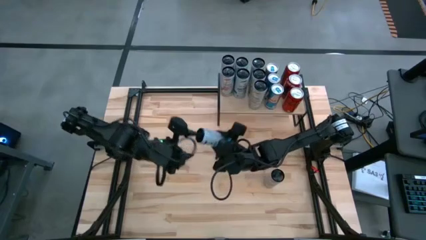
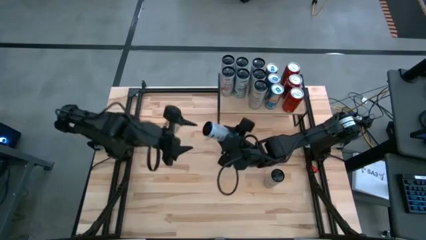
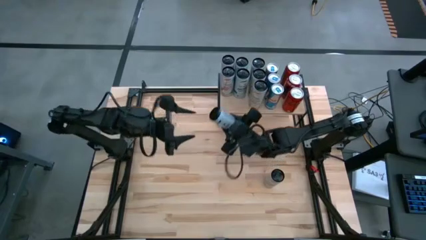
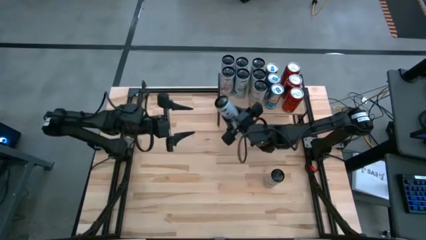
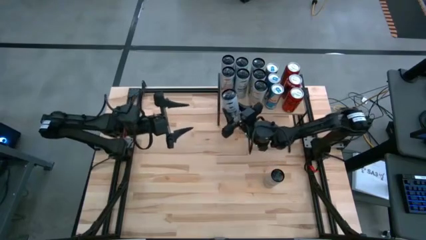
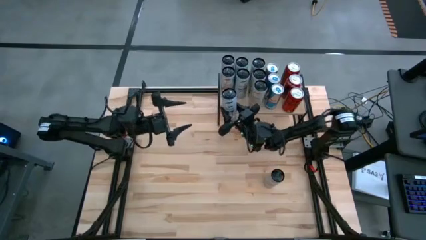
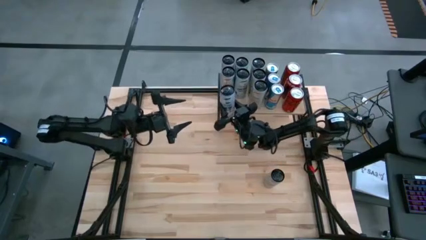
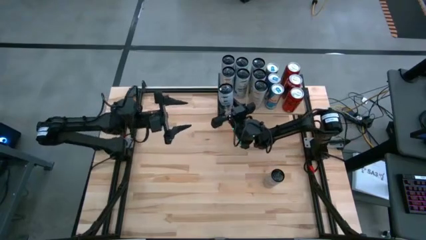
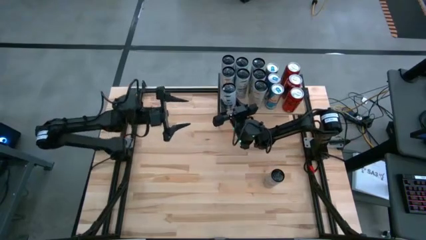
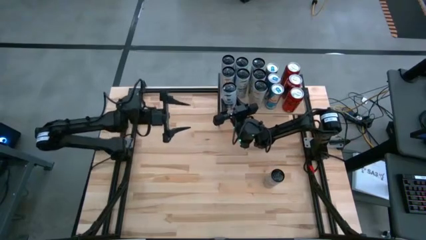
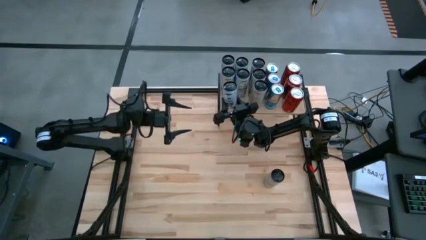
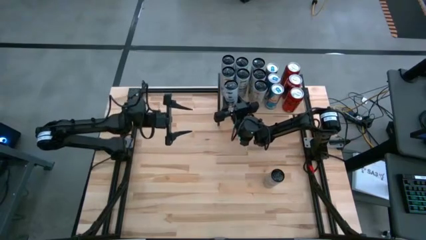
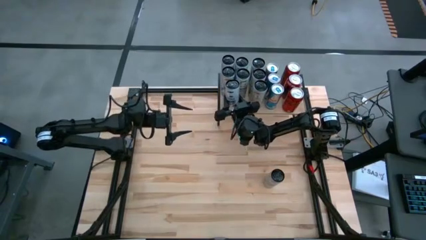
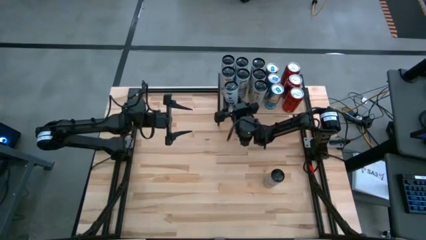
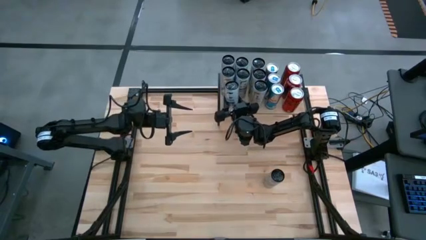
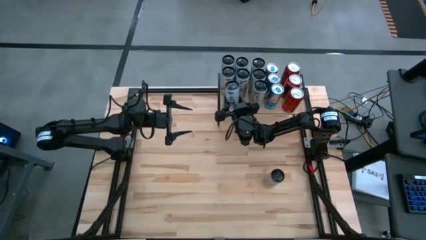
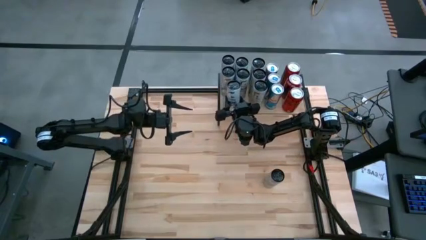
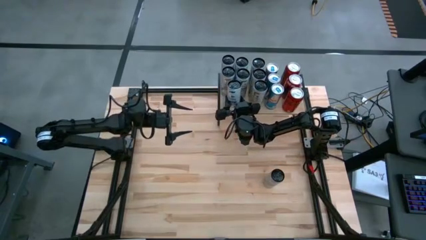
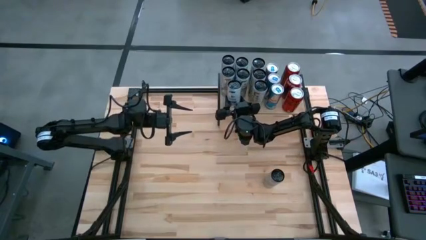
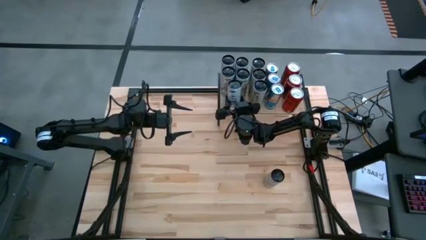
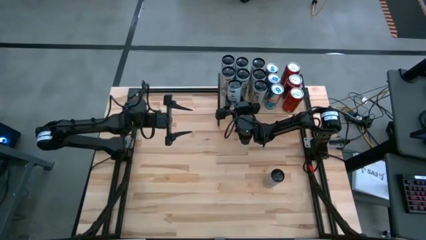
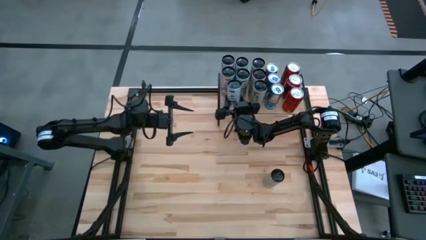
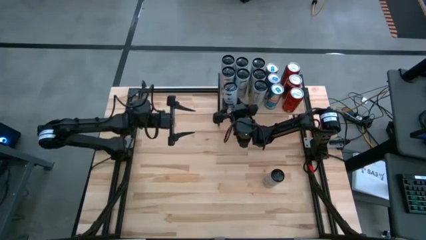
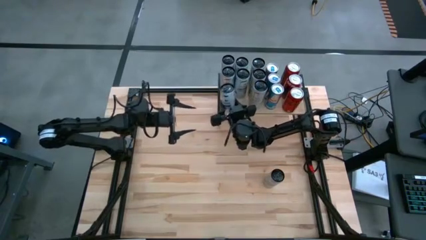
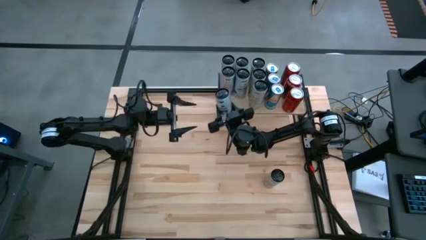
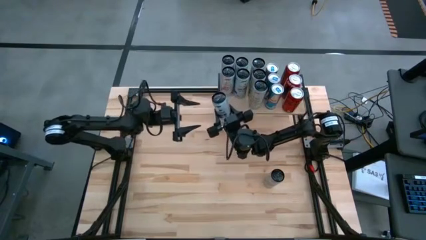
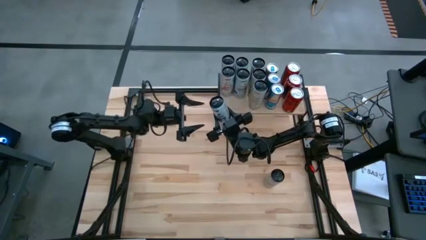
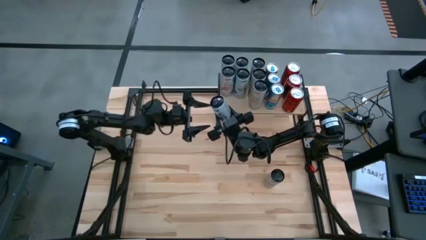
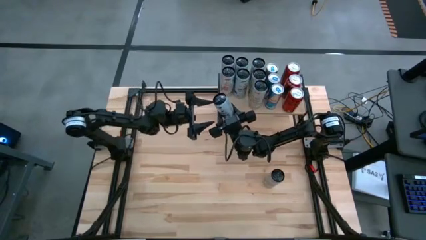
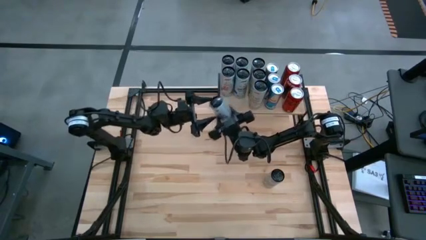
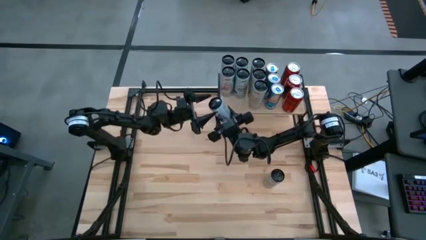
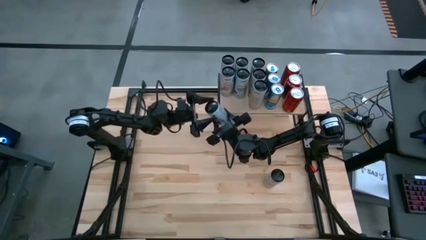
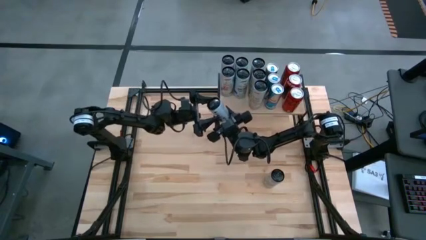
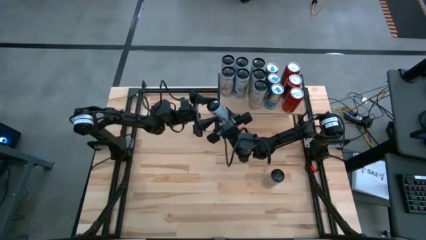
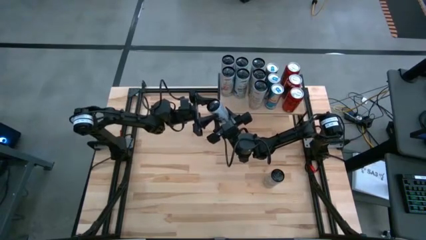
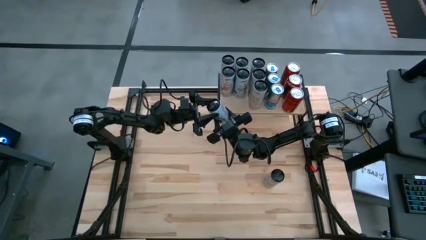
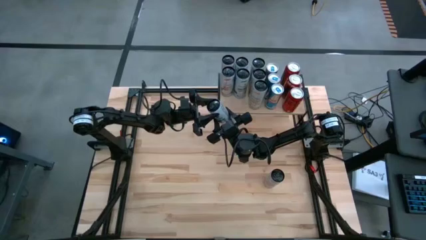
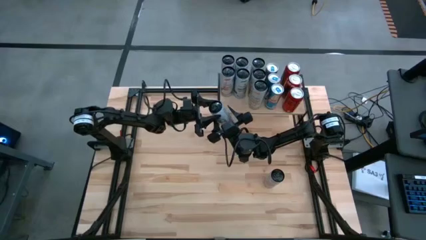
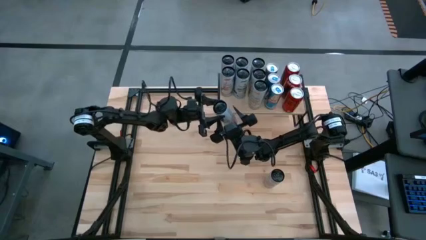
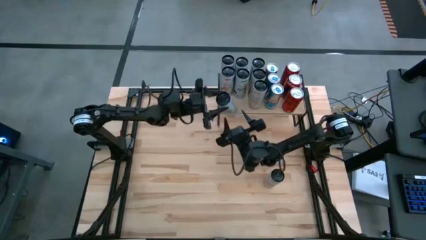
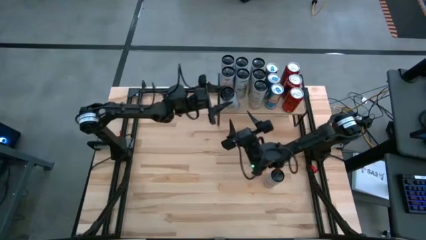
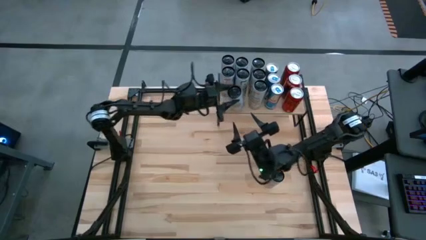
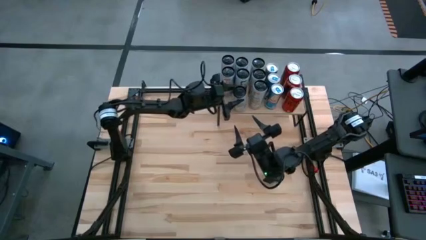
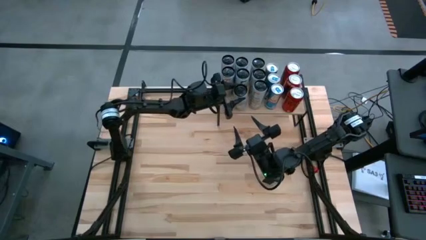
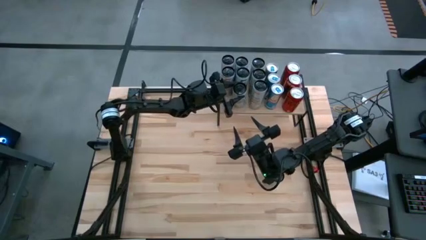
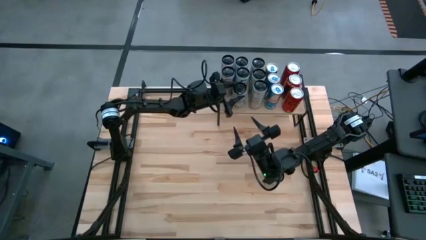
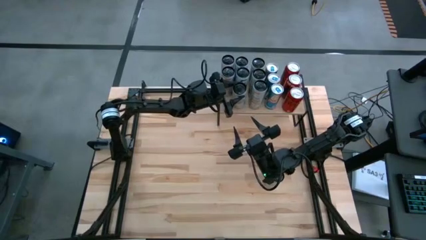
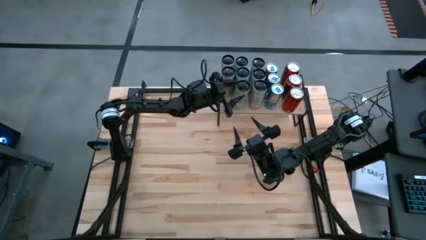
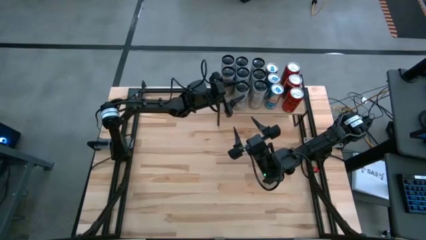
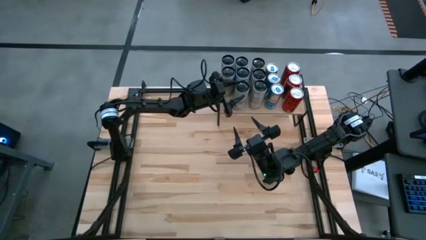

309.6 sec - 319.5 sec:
Task: Place canned beverage on shelf
Put the white blue soda can on the shelf aligned with the other white blue soda cans

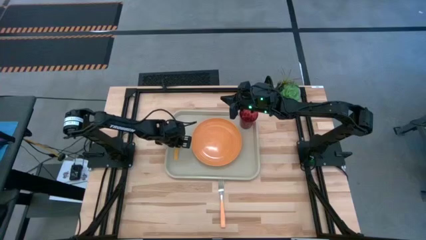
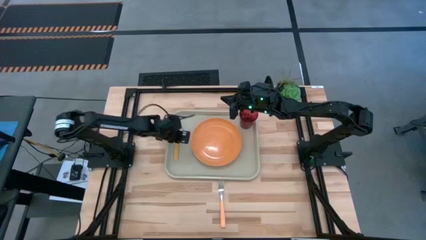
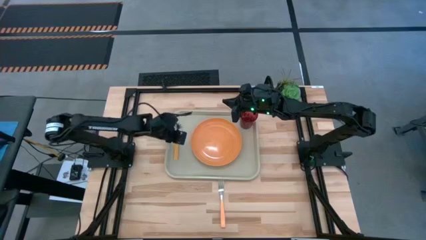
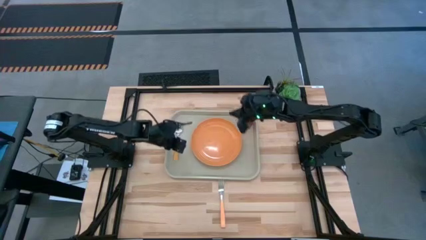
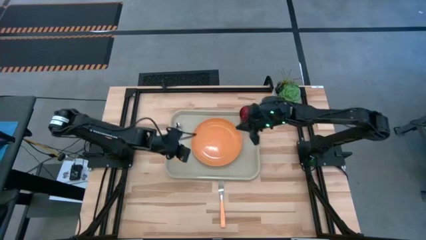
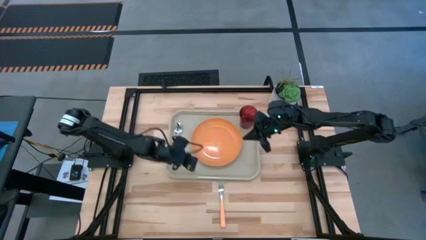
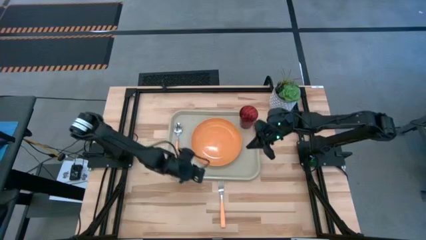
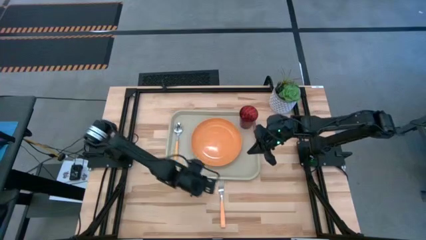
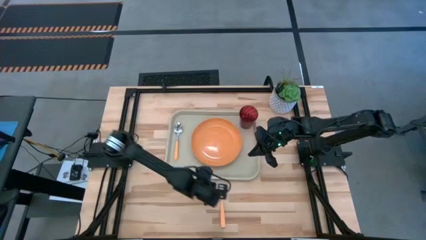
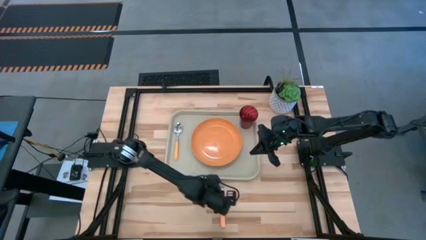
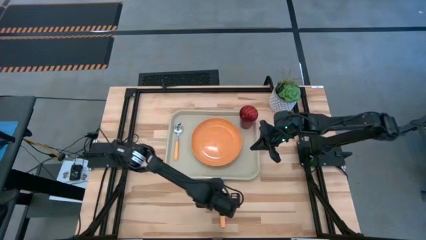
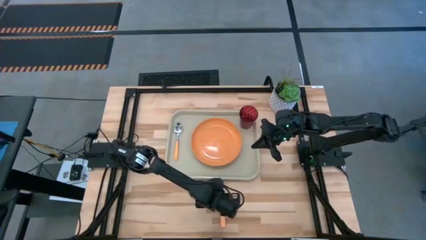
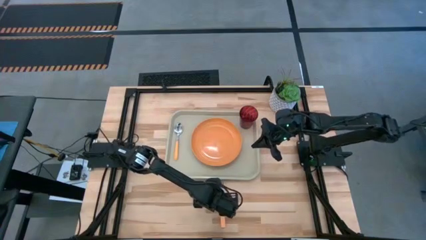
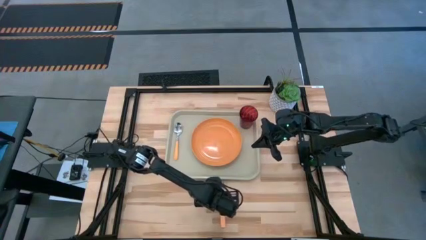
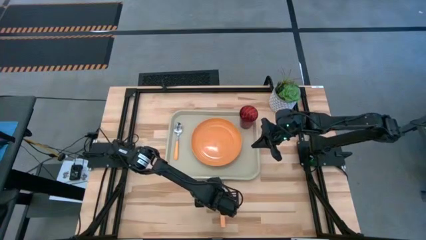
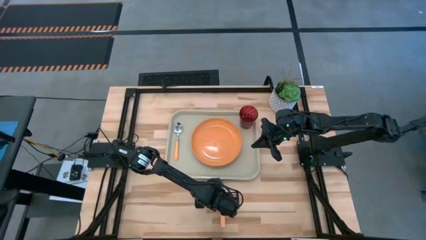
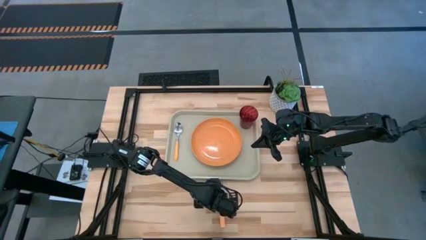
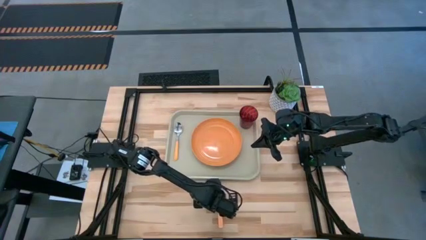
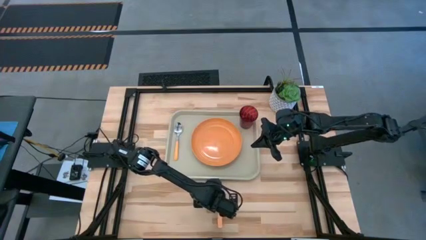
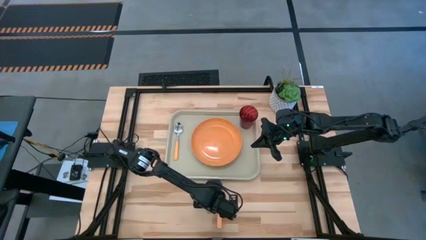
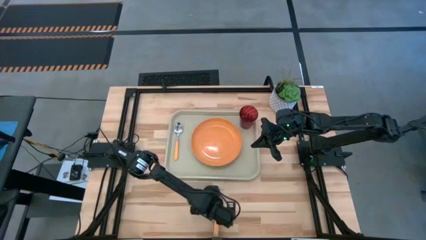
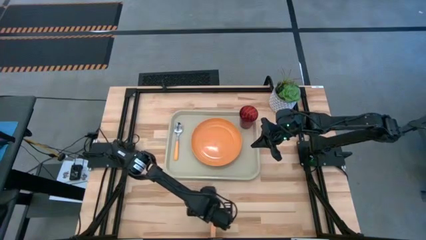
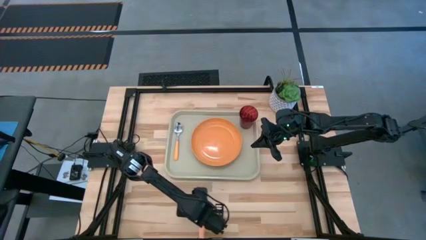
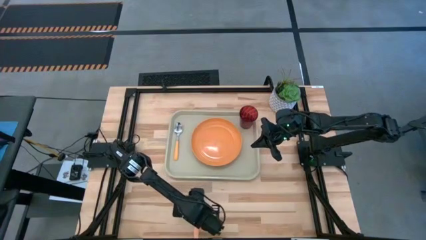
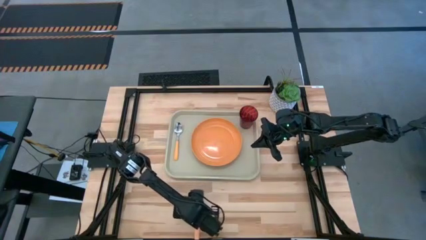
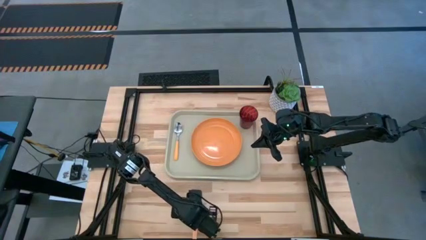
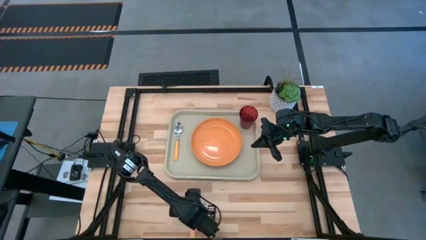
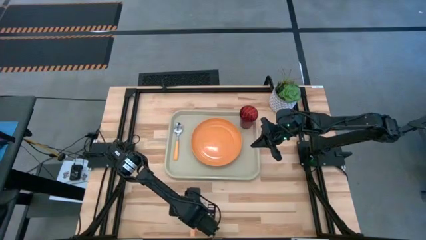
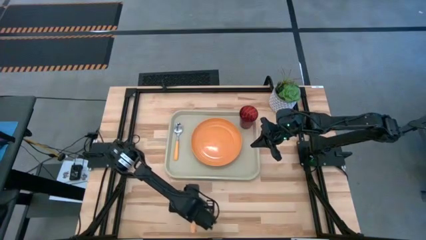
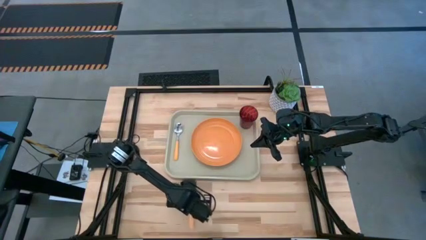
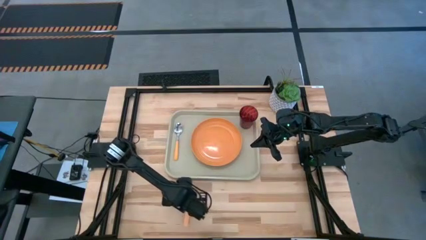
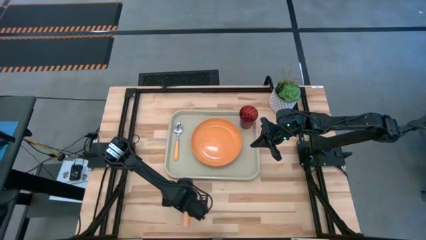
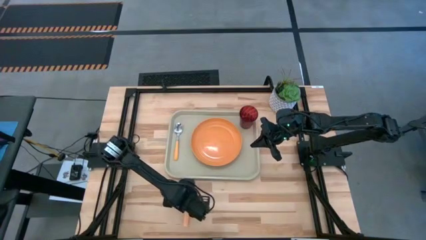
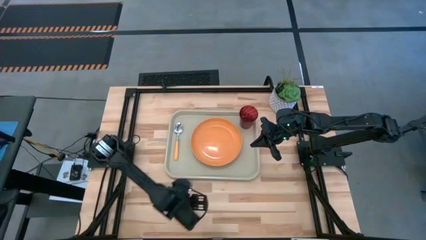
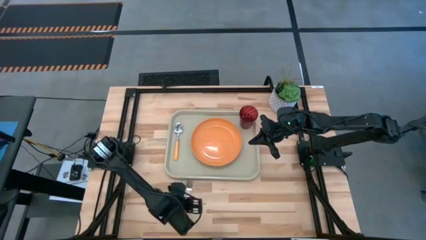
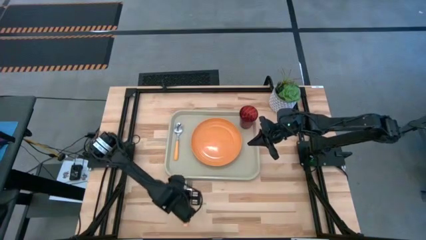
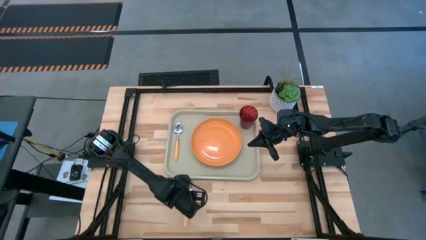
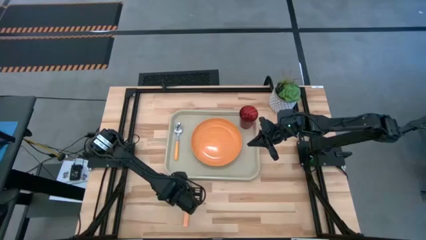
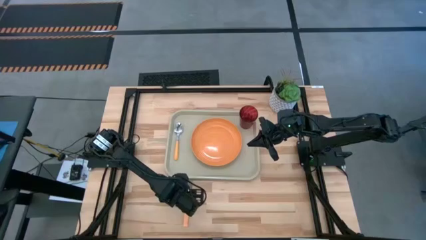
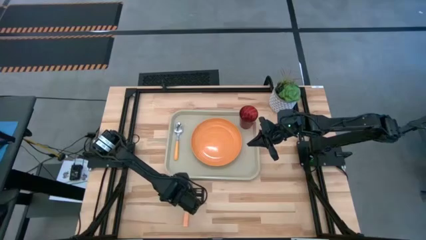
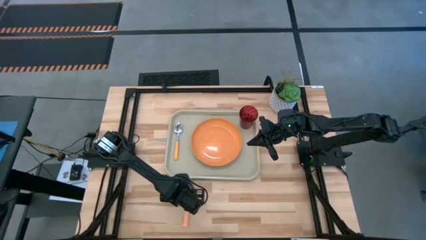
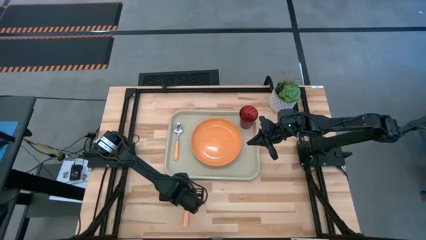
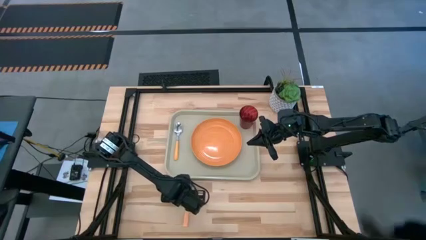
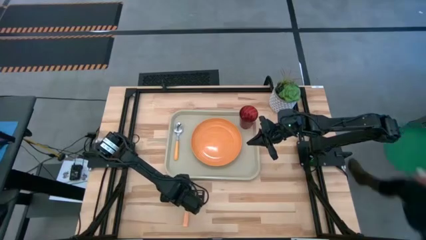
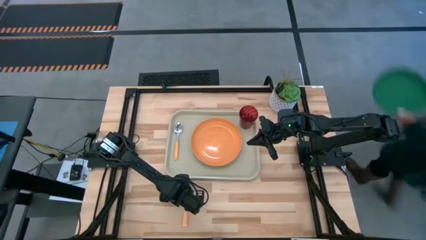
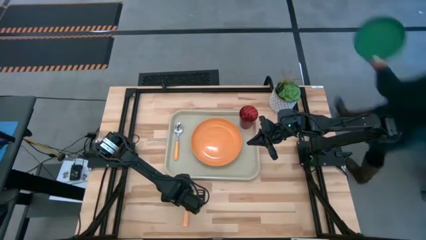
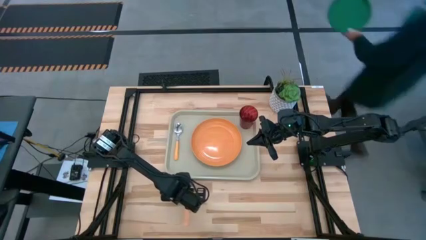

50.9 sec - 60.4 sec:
Task: Pick and place plate/cup/fork/spoon on tray
Put the light orange fork to the right of the orange spoon on the gray serving tray
